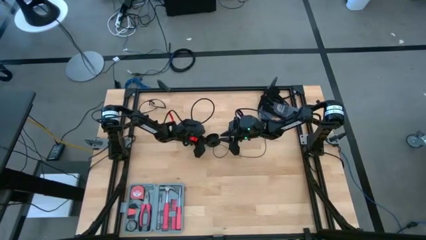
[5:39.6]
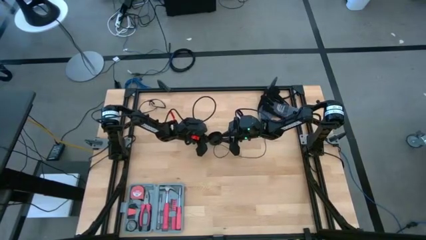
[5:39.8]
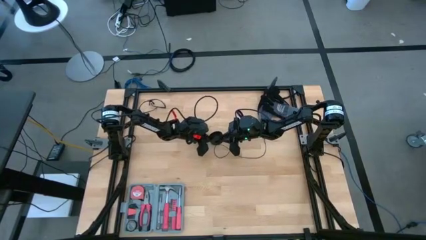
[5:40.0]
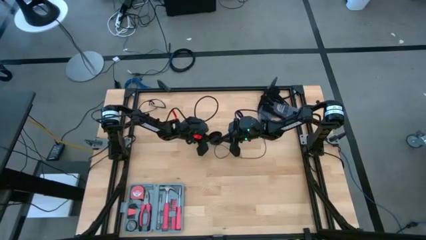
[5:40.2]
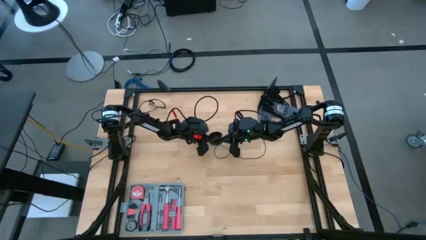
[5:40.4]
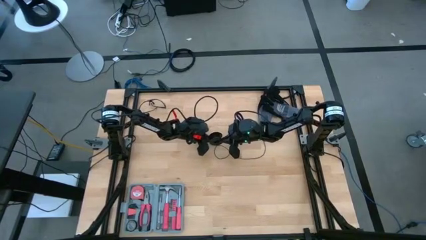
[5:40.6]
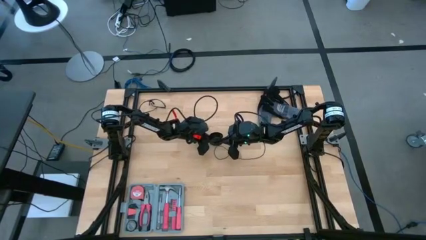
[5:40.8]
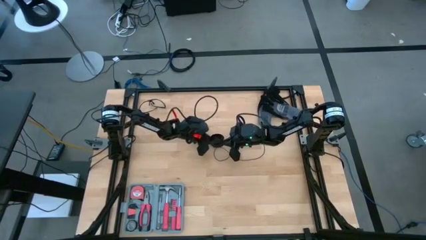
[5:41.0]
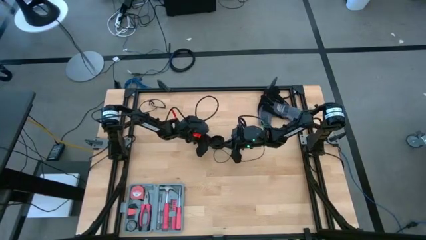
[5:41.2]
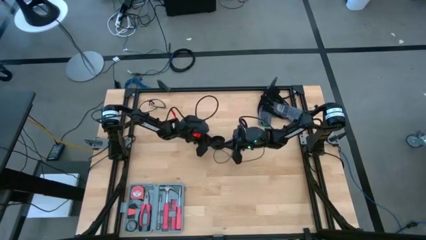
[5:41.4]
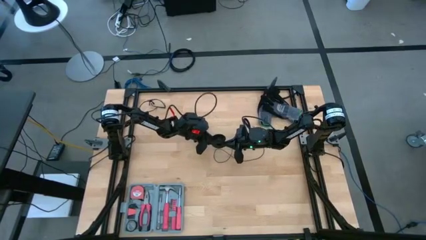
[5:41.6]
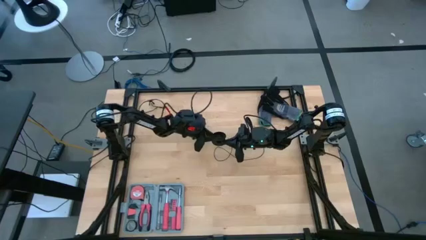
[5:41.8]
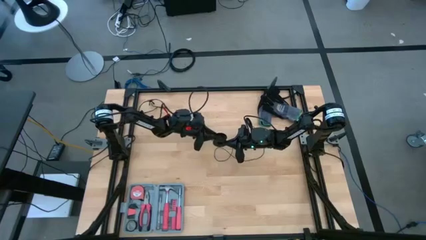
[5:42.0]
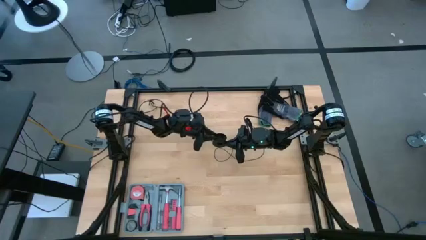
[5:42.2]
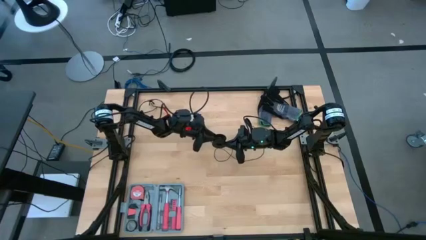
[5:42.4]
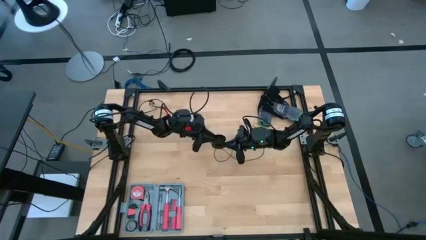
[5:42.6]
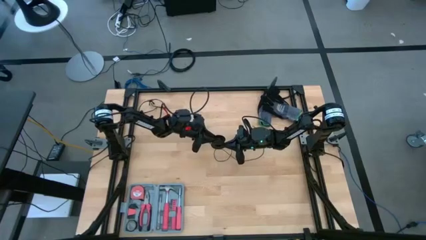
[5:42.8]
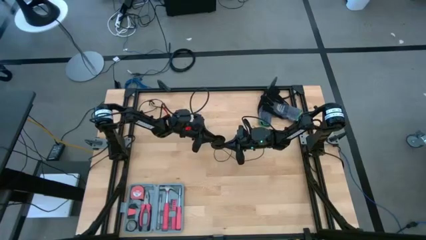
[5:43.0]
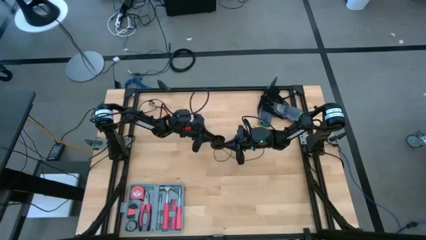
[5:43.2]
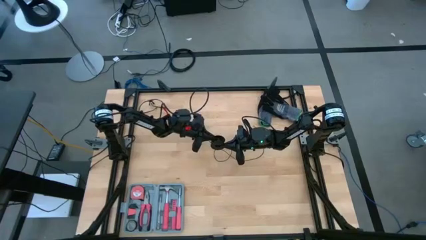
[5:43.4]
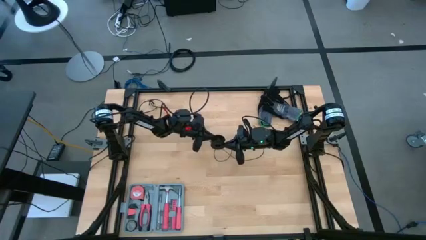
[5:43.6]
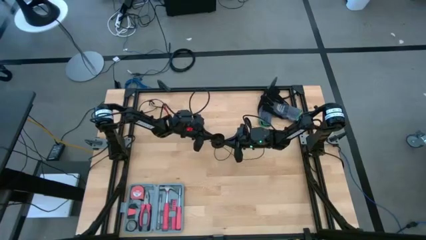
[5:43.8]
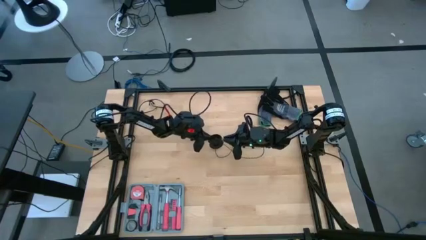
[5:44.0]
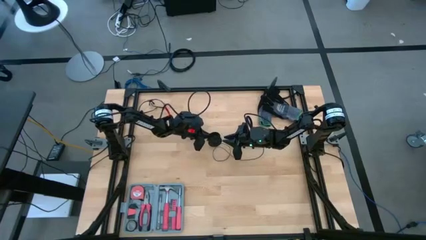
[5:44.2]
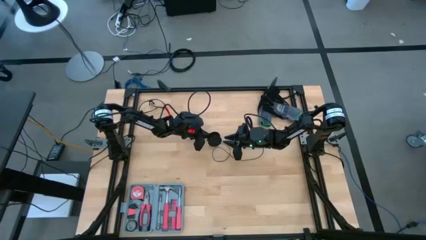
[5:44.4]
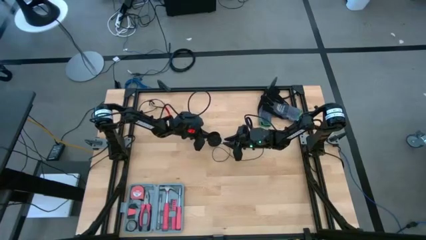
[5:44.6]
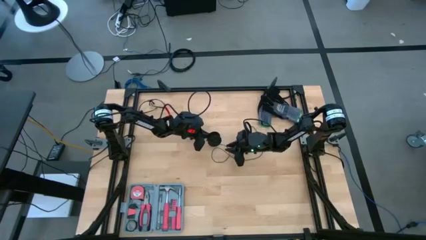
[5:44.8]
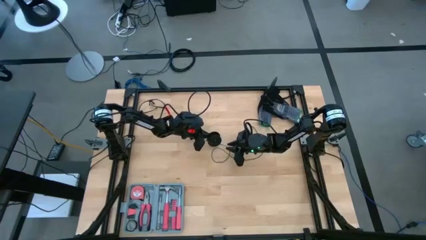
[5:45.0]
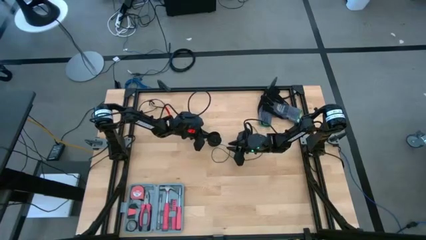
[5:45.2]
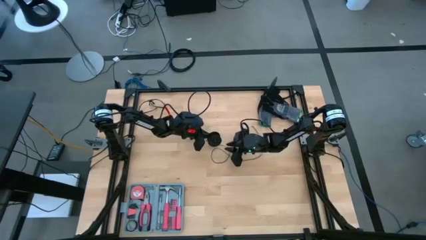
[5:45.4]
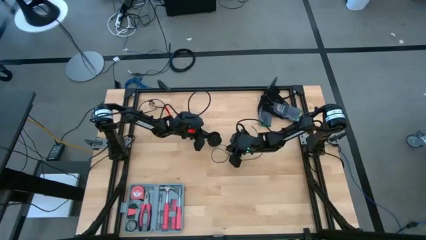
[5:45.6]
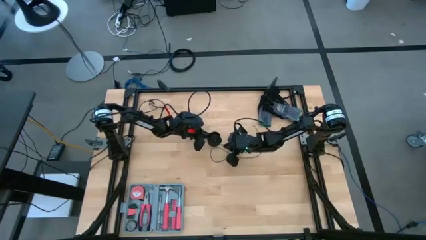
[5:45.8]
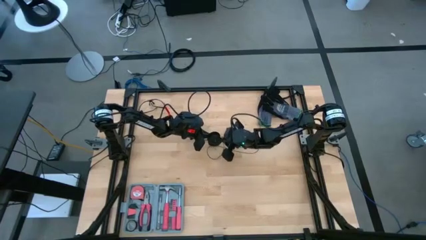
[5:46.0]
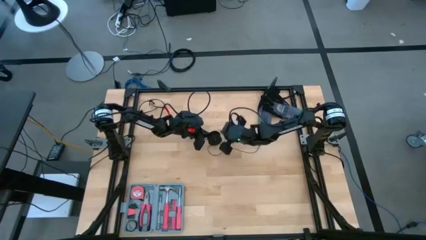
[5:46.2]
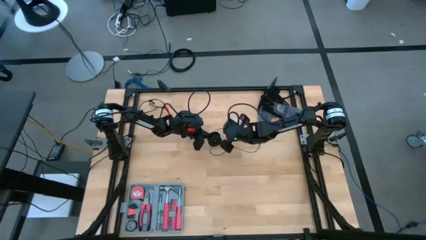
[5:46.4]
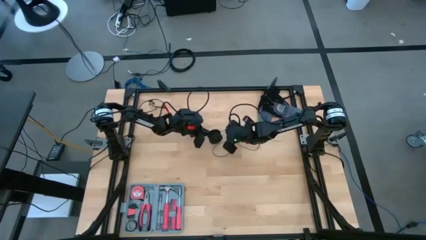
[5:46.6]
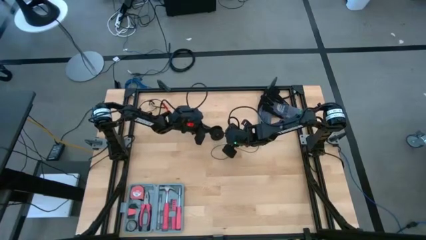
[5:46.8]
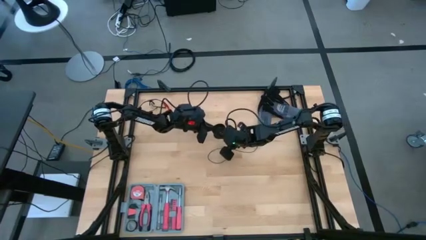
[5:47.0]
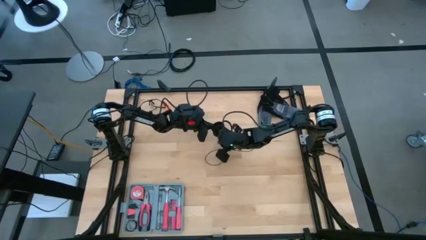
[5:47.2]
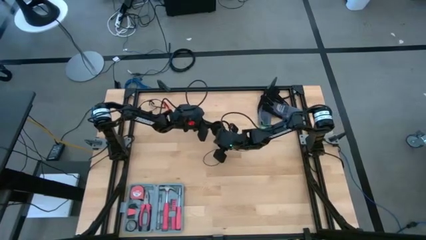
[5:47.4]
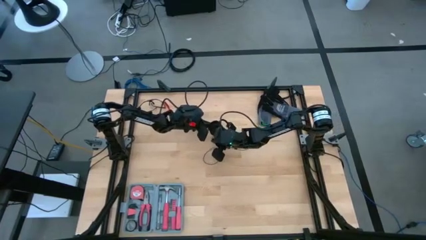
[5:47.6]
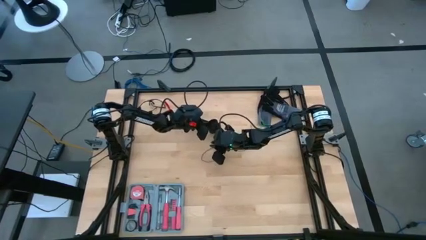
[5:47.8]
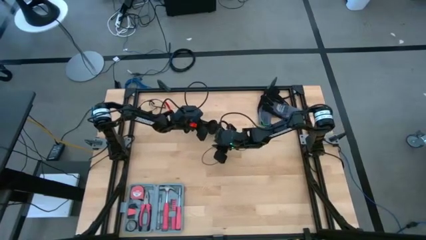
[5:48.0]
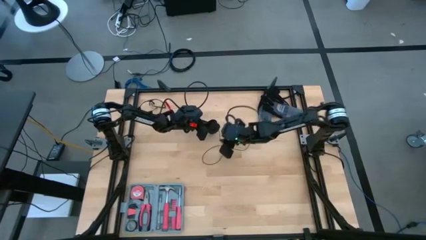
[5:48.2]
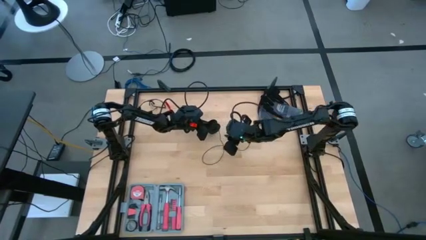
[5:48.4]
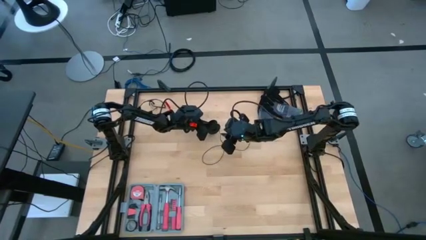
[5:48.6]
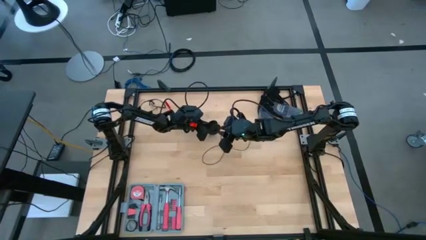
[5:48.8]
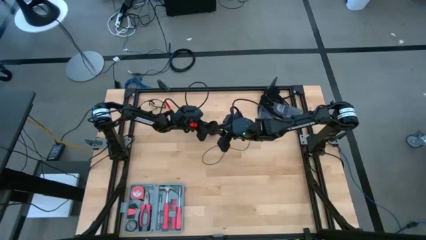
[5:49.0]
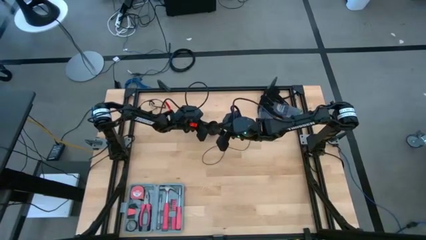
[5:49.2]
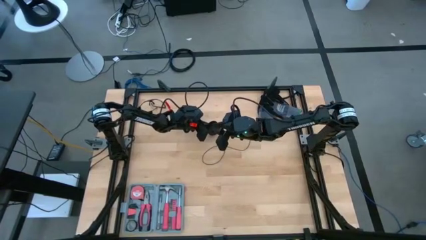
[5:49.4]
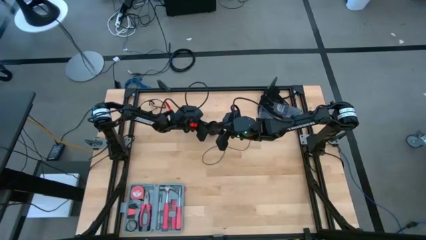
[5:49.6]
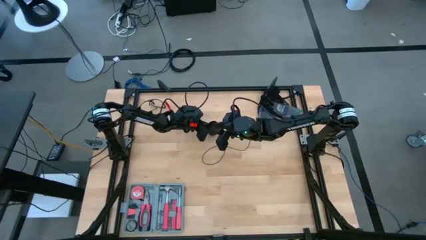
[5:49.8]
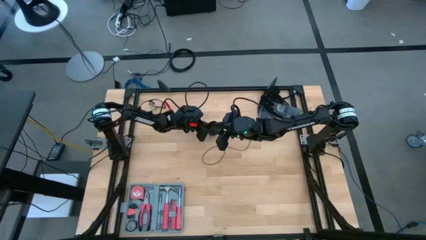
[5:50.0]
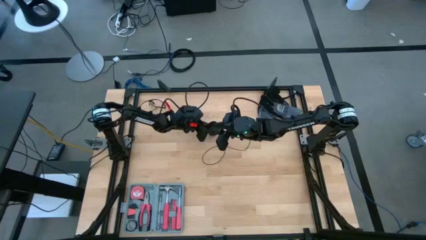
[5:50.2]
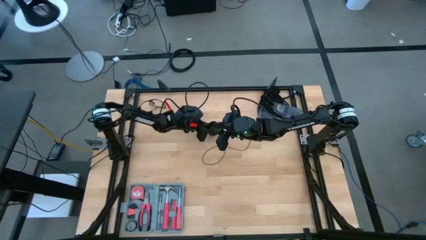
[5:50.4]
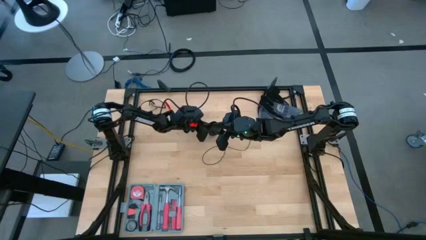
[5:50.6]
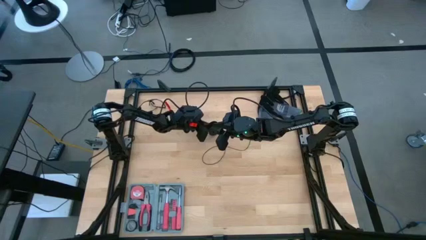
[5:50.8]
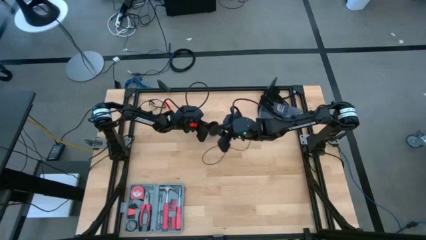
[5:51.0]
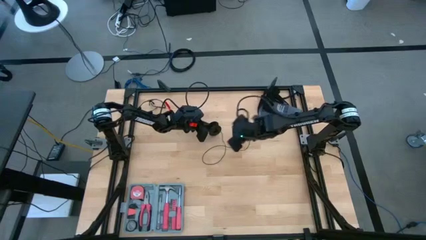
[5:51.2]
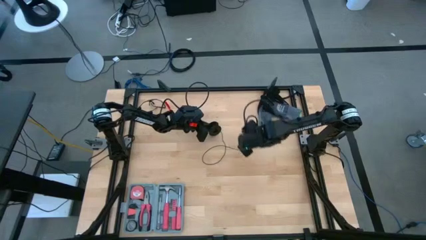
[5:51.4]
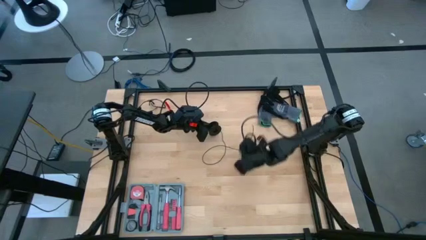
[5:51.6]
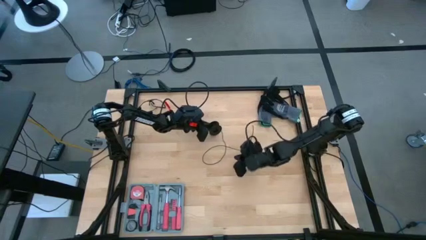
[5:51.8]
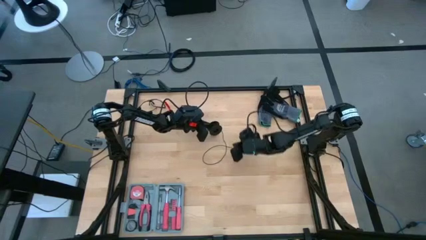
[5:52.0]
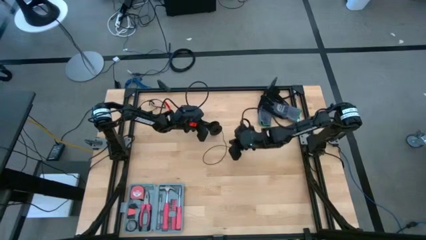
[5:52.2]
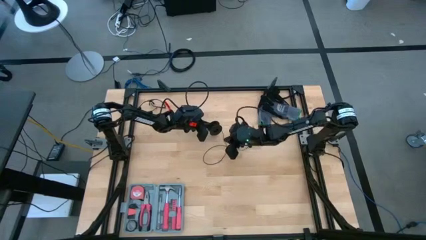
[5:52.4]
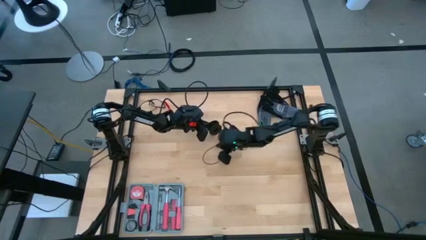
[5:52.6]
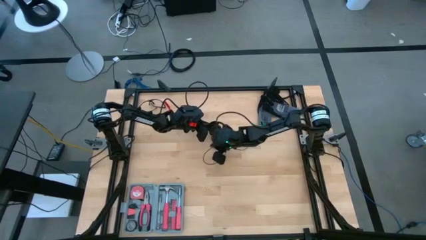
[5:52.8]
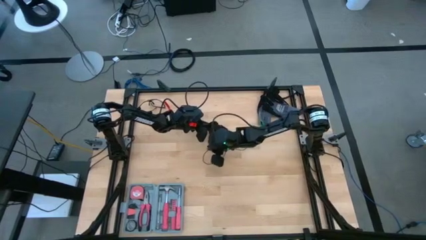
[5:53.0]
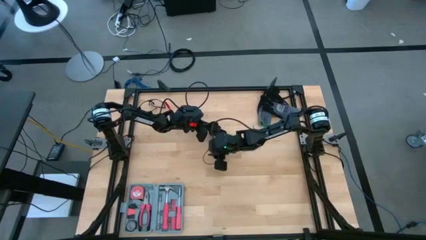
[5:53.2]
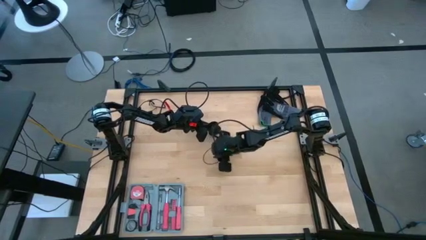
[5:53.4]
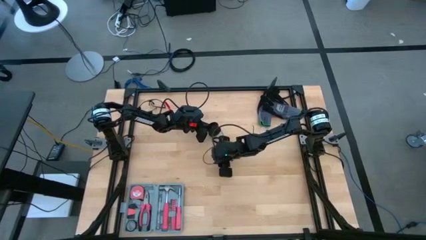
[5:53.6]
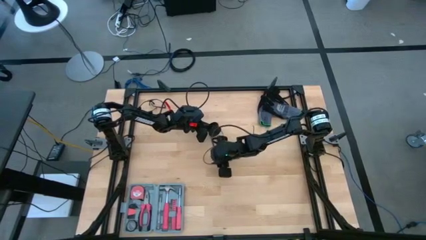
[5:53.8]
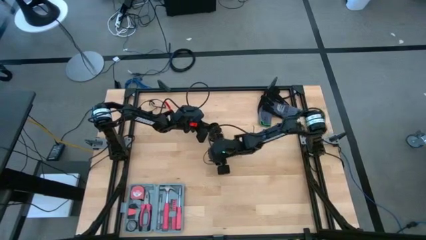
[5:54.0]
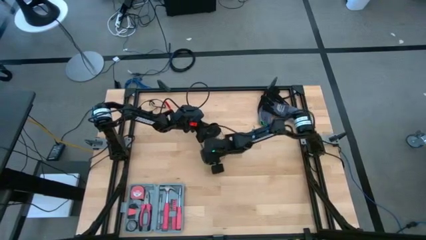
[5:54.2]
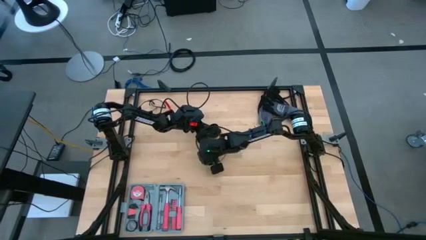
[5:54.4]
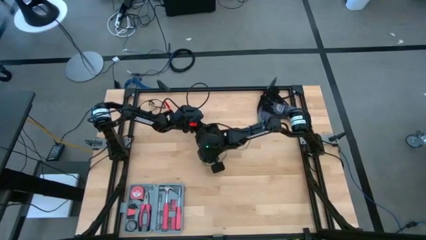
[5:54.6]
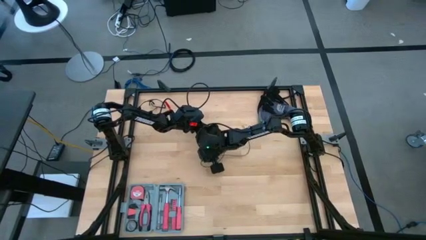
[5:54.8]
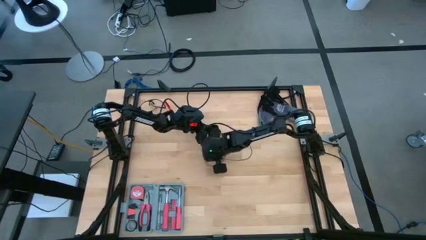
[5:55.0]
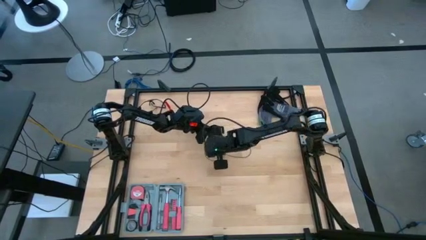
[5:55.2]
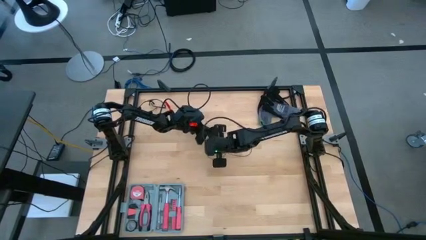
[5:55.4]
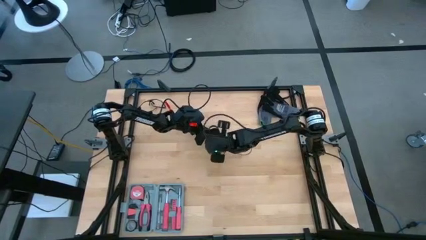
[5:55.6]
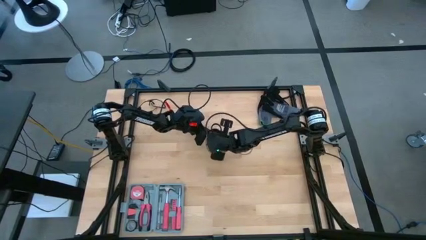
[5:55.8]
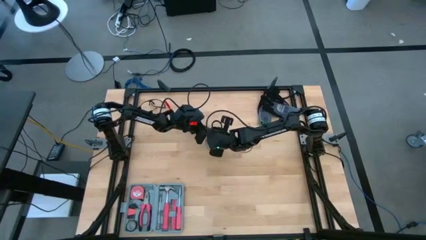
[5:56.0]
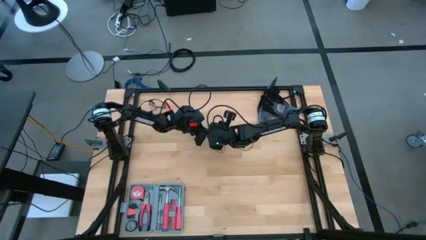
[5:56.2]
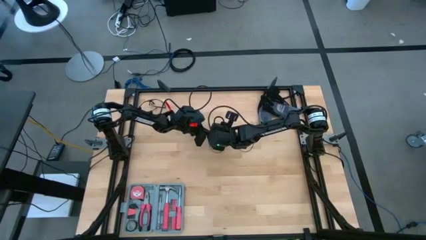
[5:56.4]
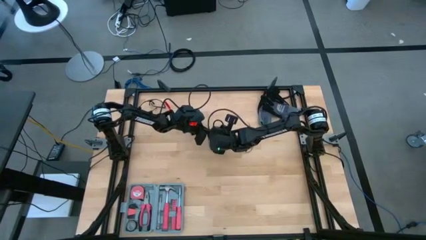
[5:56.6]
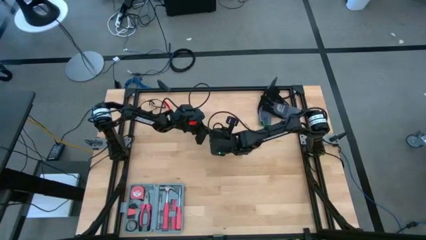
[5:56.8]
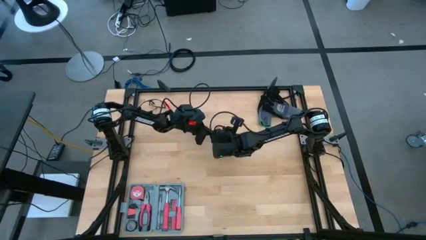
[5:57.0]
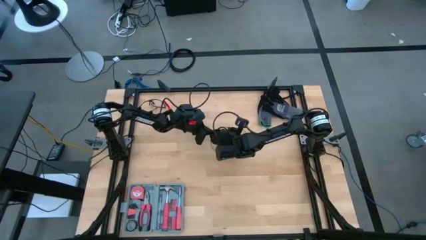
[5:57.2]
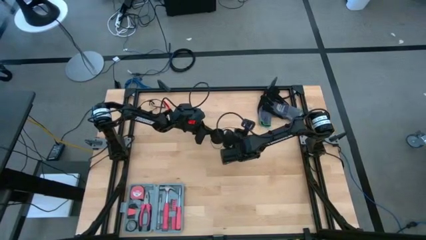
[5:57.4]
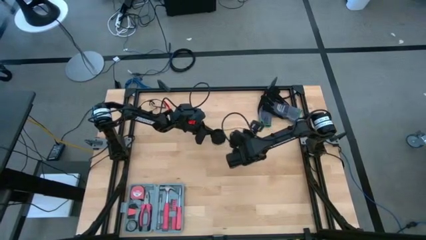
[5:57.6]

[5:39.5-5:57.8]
Task: Coil cords
Coil the black wire onto the black spool
